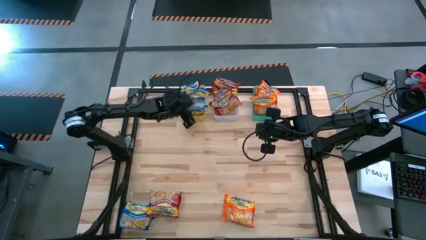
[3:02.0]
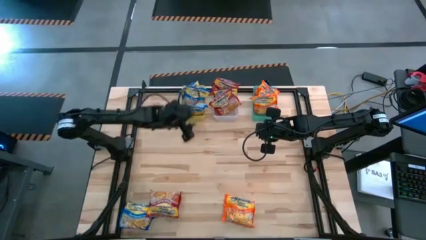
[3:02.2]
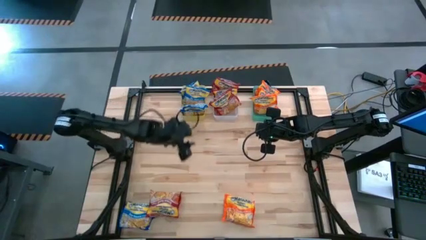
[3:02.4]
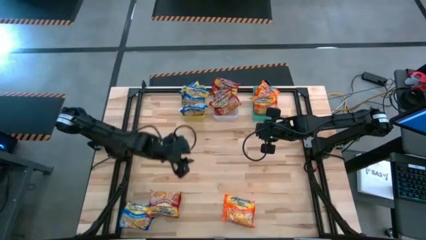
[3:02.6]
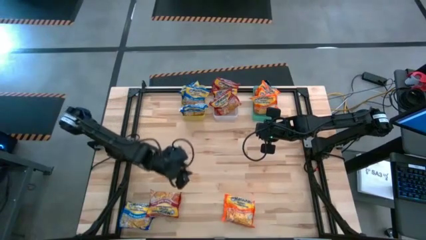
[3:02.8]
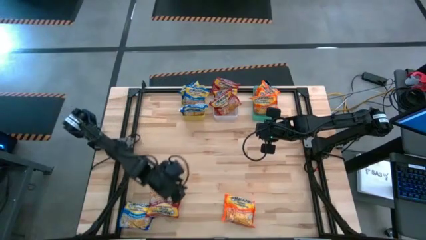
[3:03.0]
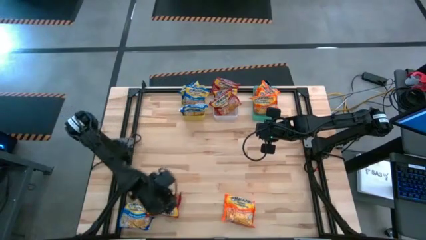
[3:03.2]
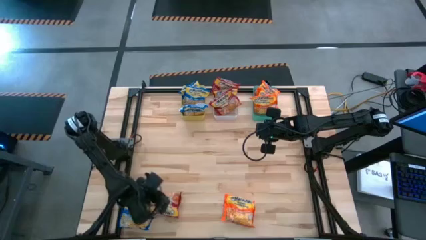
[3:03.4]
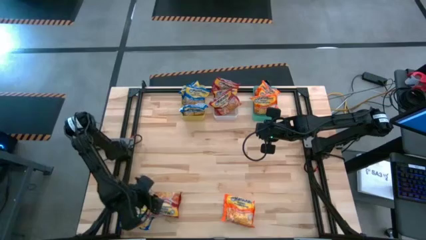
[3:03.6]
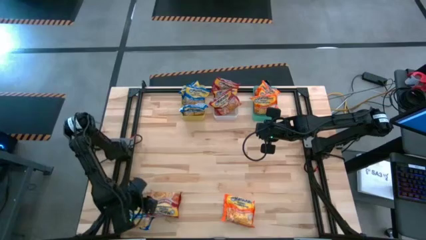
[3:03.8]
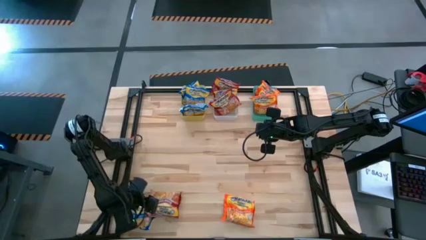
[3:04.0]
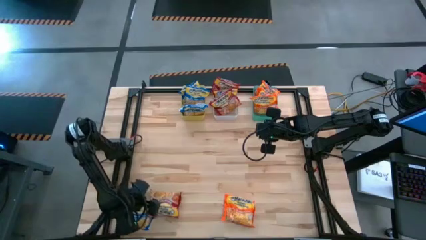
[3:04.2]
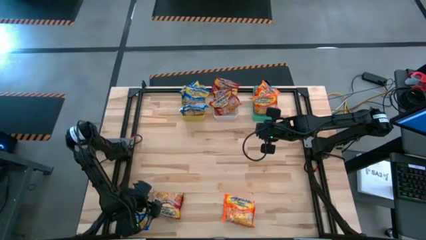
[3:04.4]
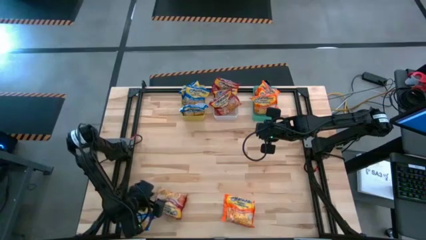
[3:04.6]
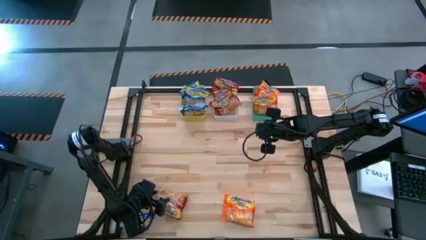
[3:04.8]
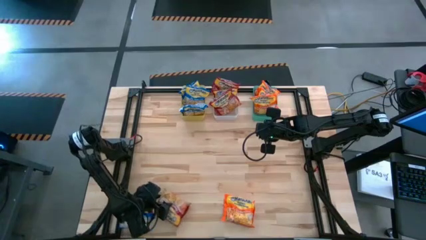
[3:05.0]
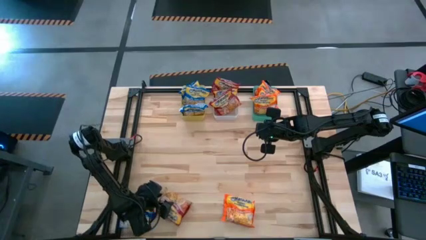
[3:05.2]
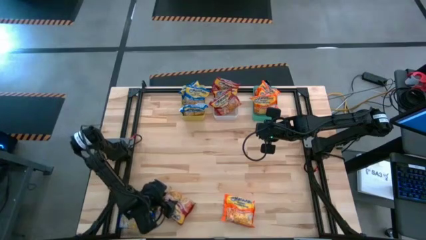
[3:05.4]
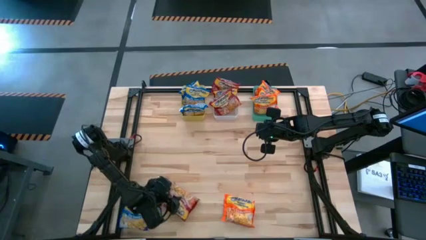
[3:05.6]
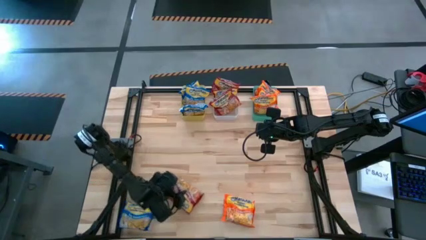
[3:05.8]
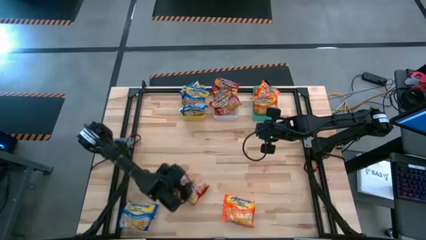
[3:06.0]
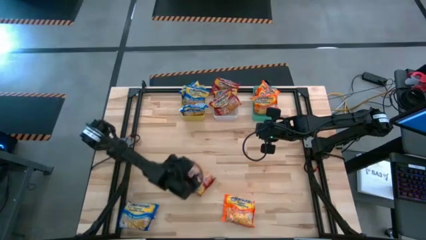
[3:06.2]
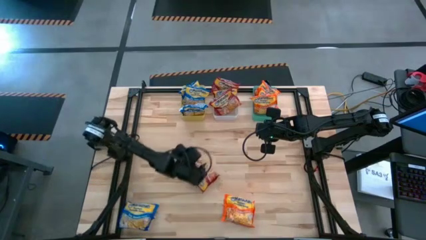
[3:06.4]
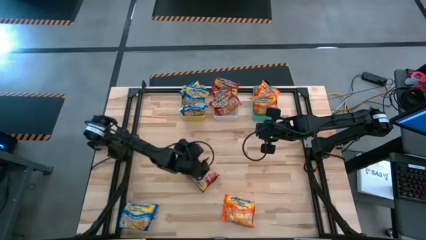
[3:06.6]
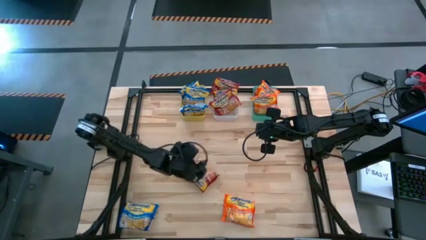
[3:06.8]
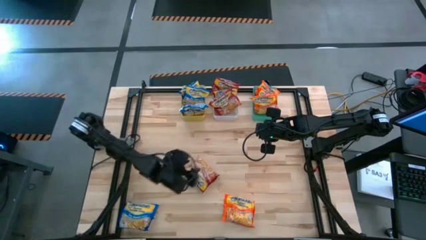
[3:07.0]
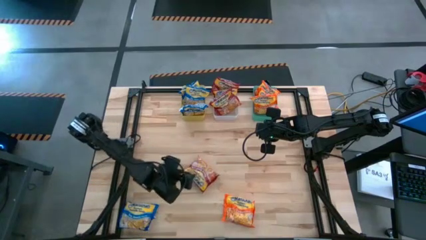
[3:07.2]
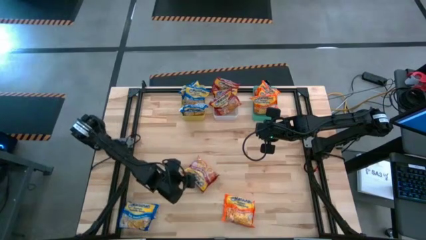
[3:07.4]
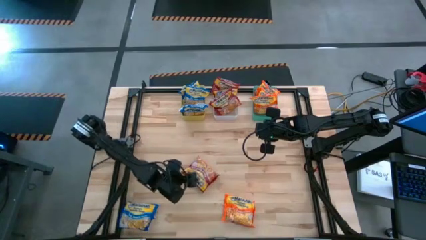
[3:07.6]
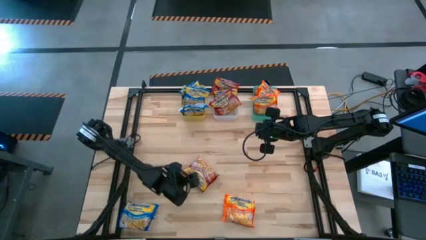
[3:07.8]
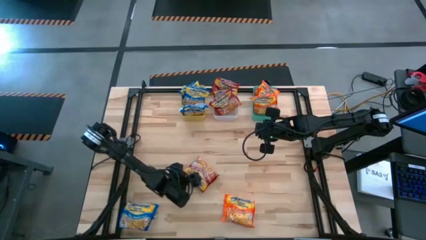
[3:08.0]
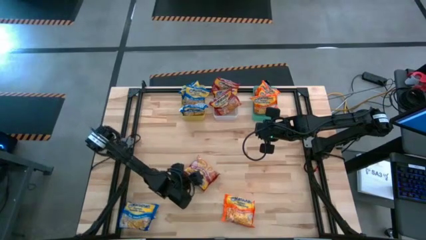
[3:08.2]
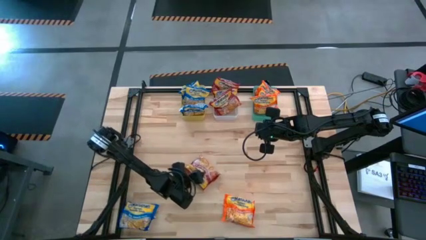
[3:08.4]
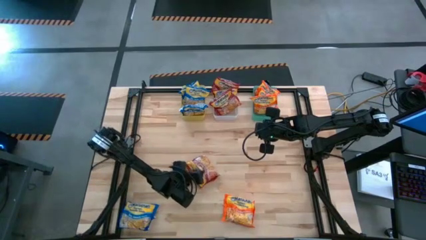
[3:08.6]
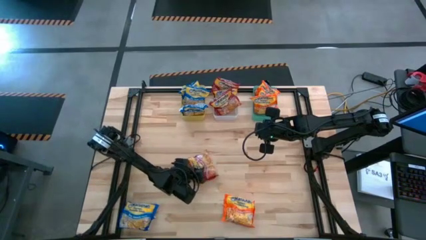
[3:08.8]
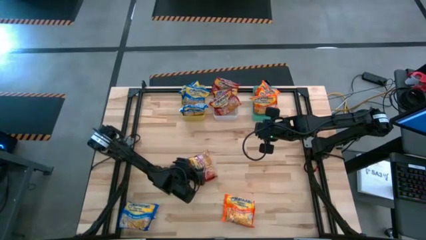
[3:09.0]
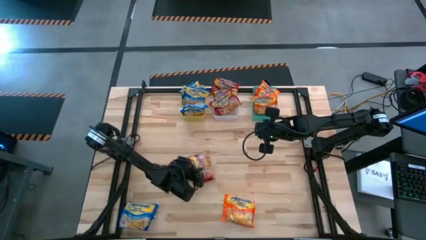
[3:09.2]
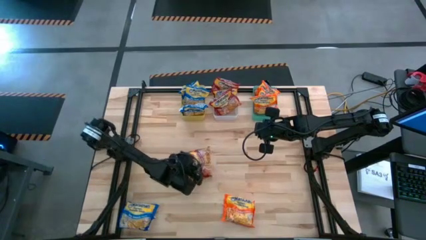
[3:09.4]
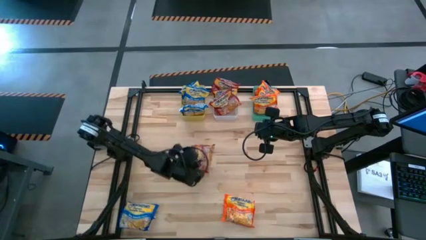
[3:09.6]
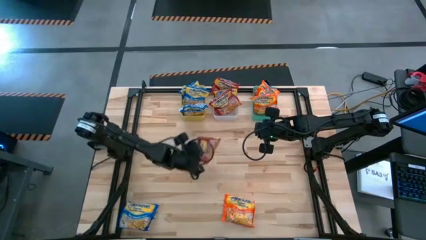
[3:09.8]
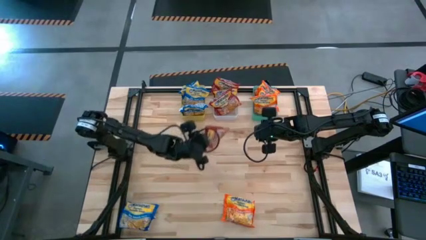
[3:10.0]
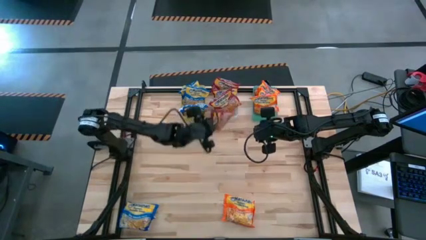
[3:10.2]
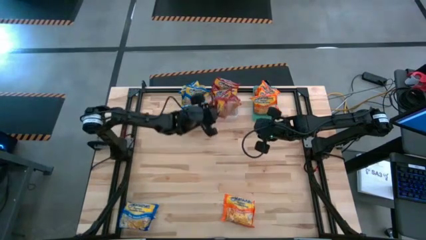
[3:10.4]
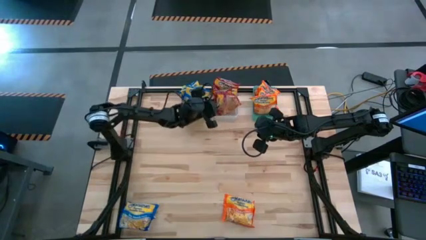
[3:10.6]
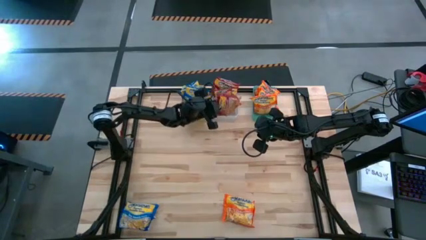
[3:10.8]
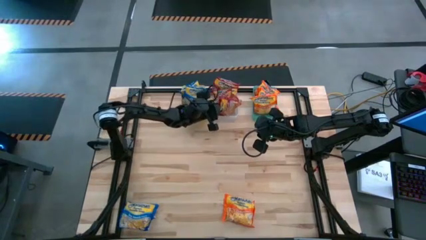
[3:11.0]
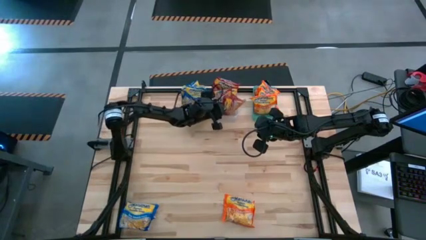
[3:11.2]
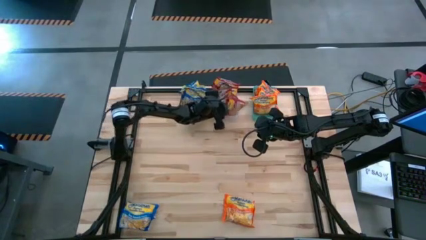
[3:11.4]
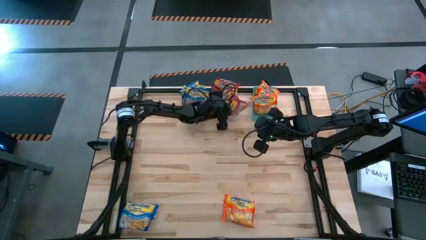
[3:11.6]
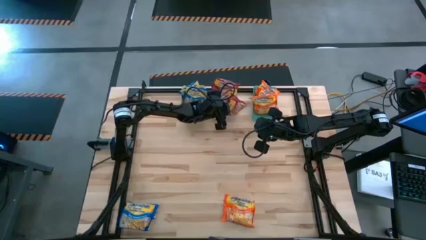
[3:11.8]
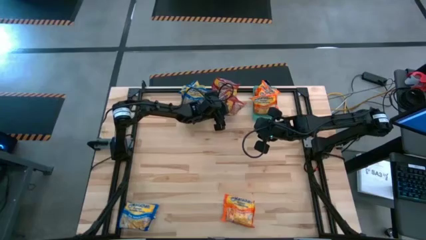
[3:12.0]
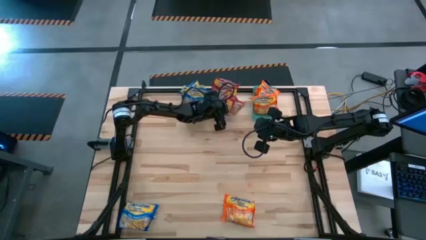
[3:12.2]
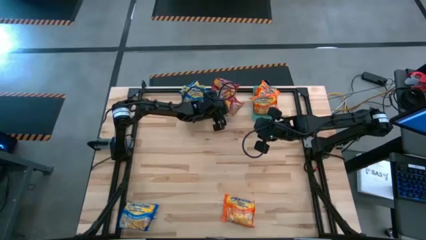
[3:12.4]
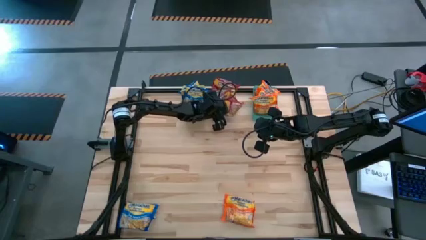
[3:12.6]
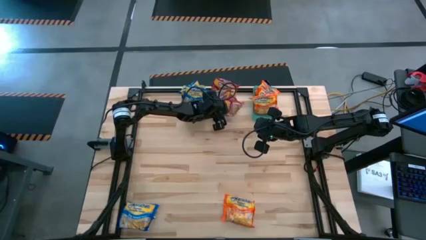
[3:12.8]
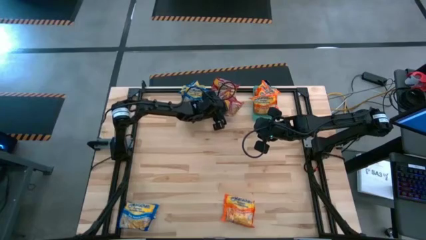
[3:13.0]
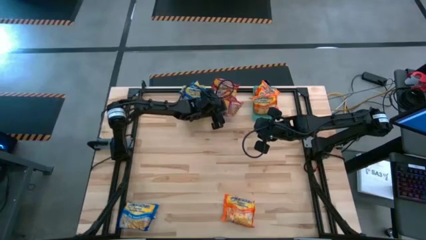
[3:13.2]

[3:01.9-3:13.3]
Task: Sort Maruchan noodles
Put the red noodle pack into the white bin

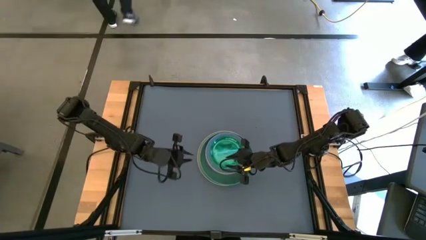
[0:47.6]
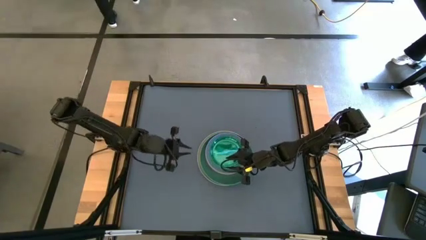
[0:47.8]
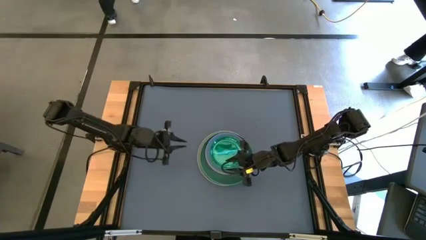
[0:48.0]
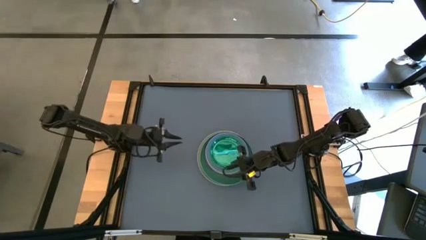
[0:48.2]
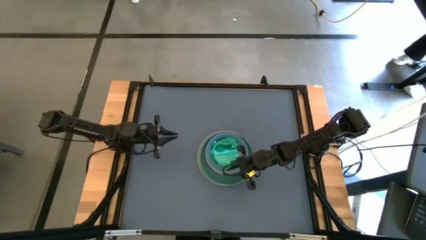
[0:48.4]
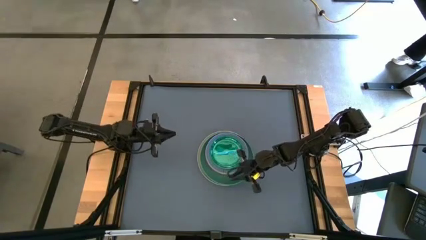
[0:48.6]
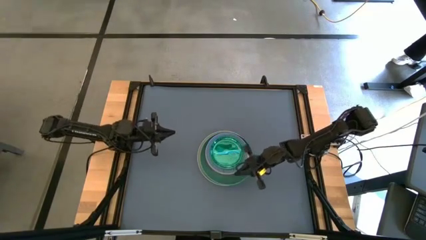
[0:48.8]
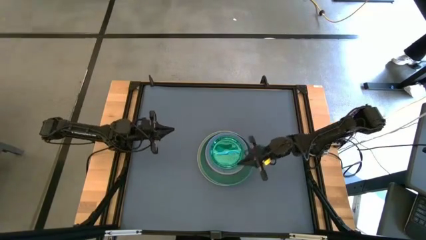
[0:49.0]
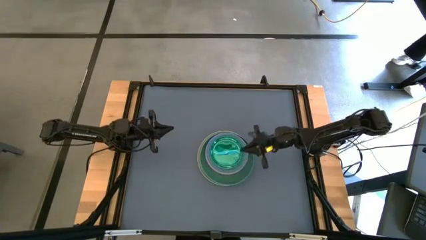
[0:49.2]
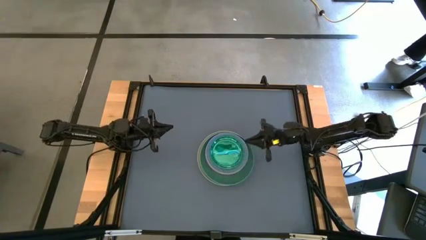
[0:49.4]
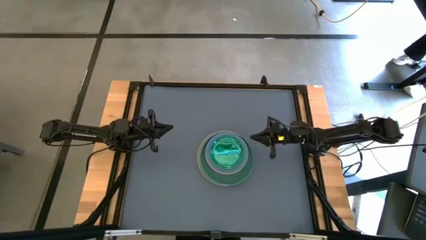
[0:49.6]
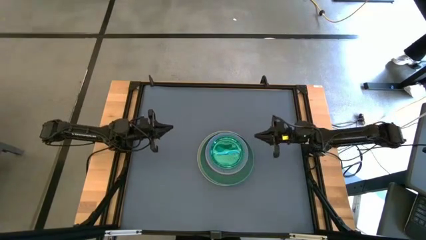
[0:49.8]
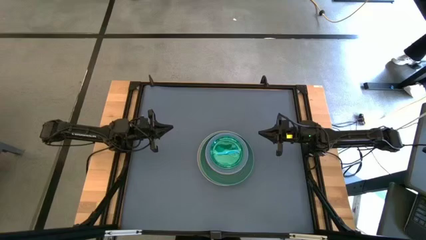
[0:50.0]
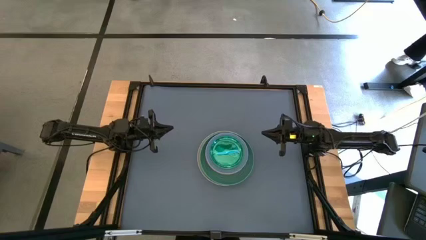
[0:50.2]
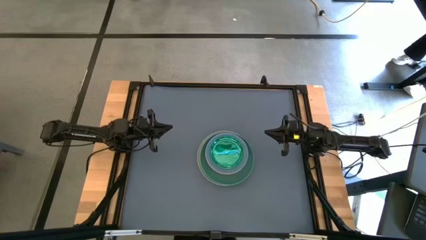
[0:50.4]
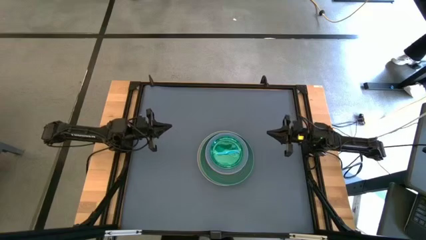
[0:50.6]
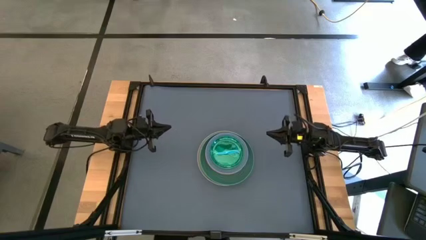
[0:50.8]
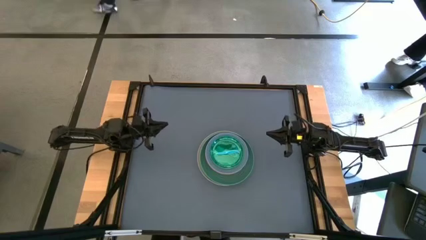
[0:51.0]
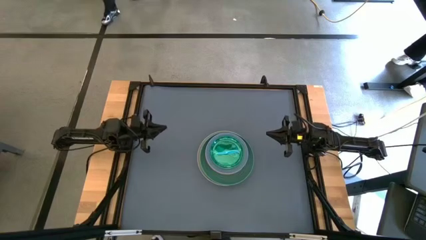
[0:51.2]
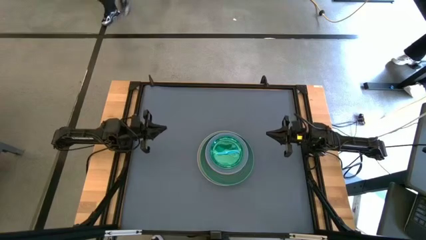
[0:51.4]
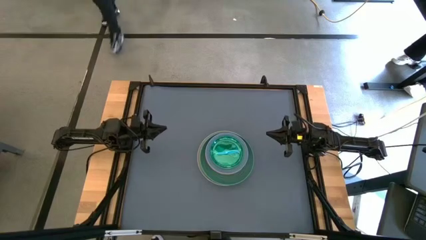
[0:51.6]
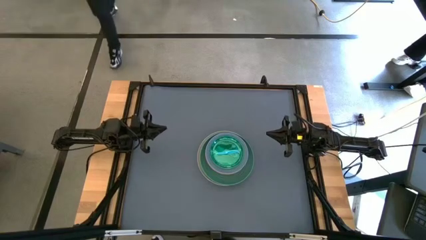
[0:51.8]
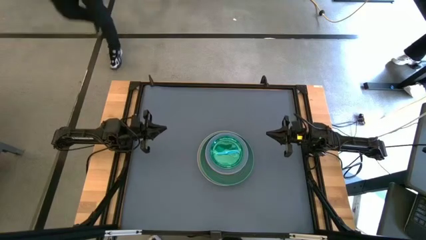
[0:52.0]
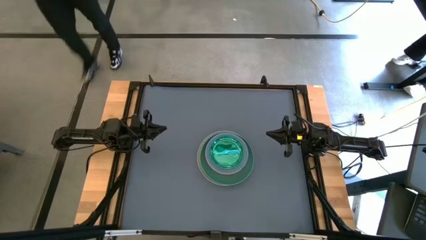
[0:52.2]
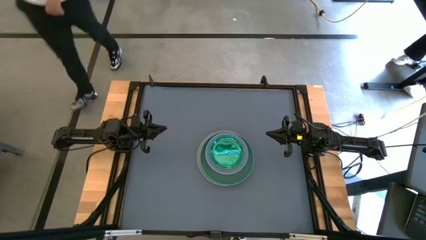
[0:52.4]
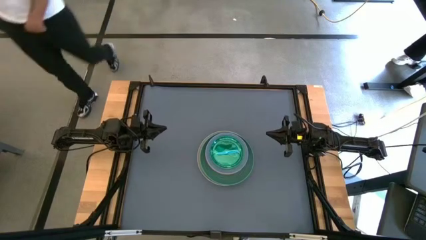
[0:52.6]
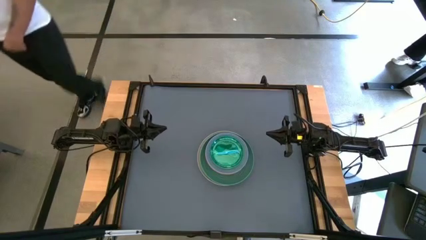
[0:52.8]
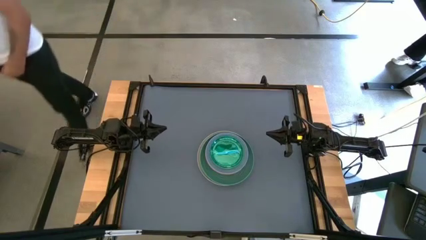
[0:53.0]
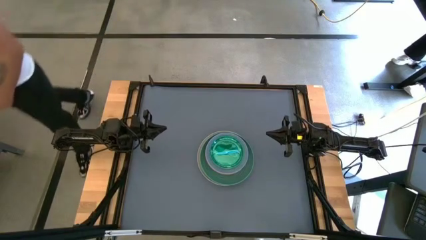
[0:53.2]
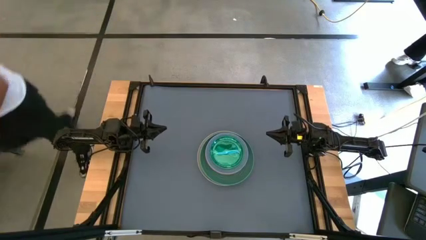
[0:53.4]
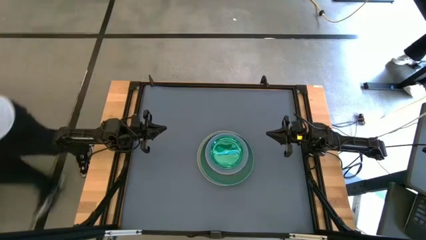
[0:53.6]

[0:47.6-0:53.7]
Task: Stack plastic plates
Return to Home Position
